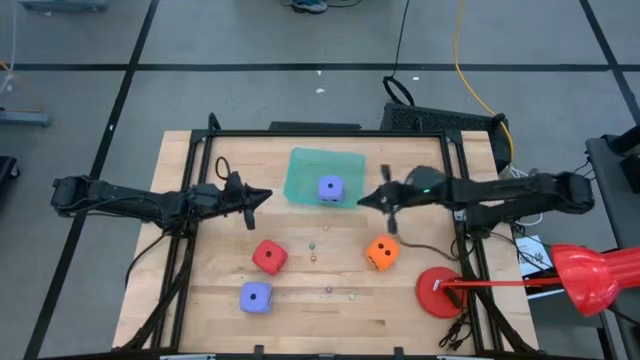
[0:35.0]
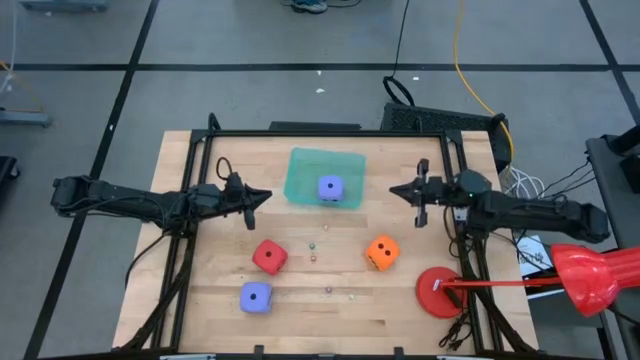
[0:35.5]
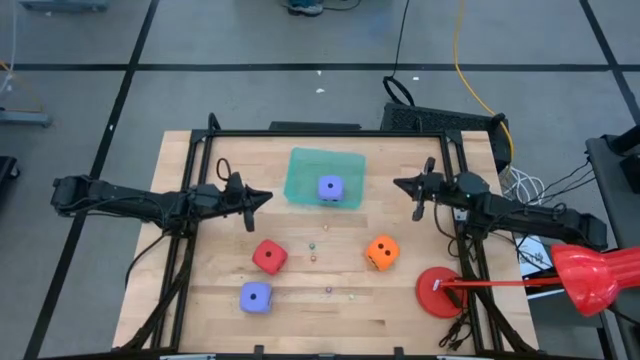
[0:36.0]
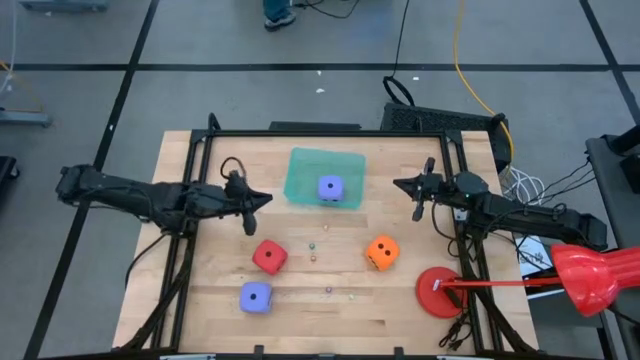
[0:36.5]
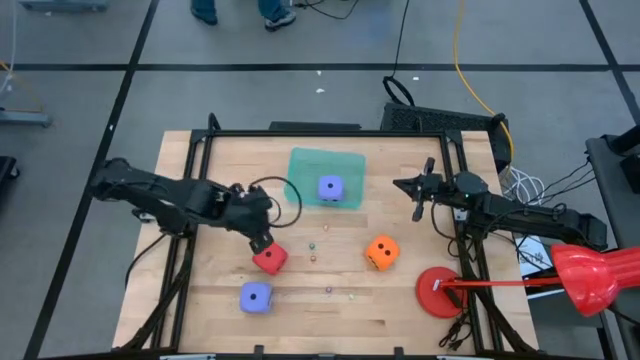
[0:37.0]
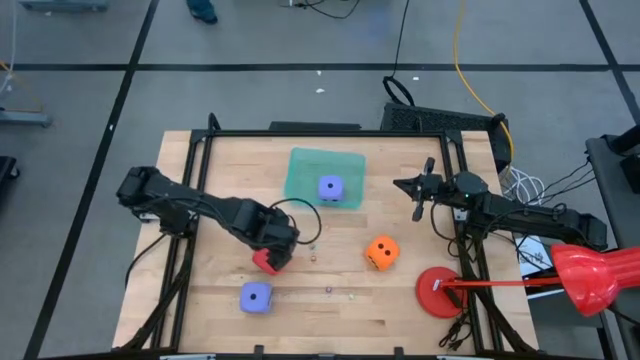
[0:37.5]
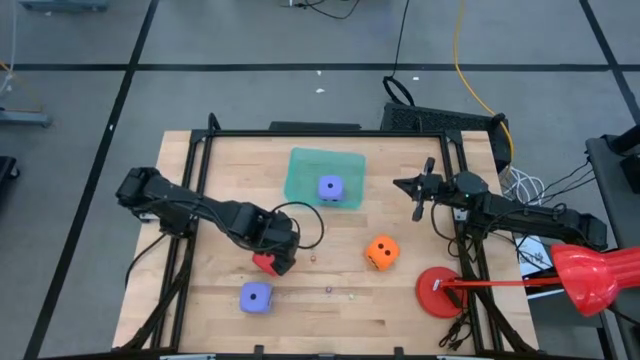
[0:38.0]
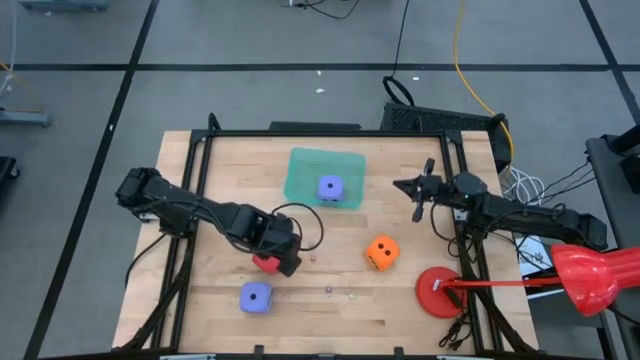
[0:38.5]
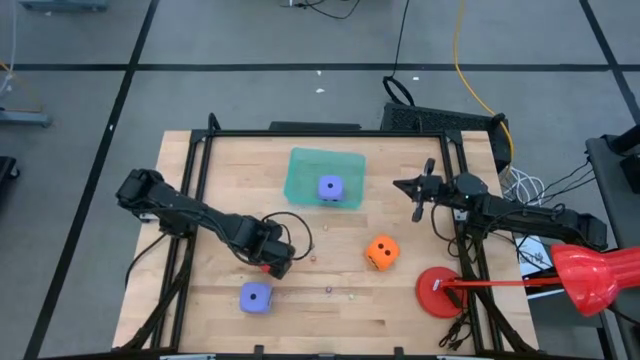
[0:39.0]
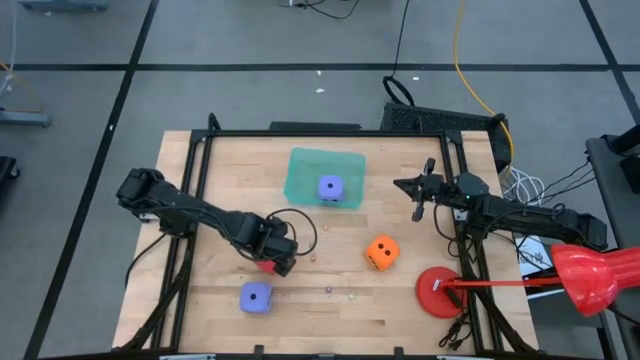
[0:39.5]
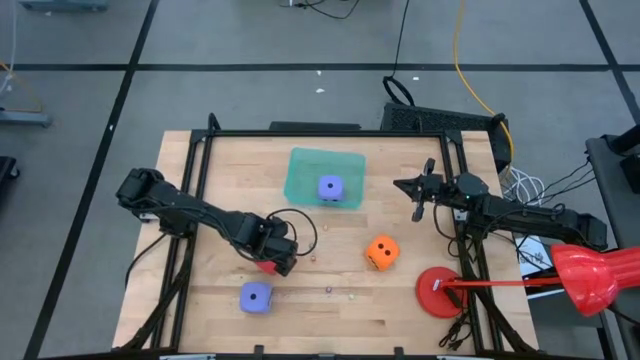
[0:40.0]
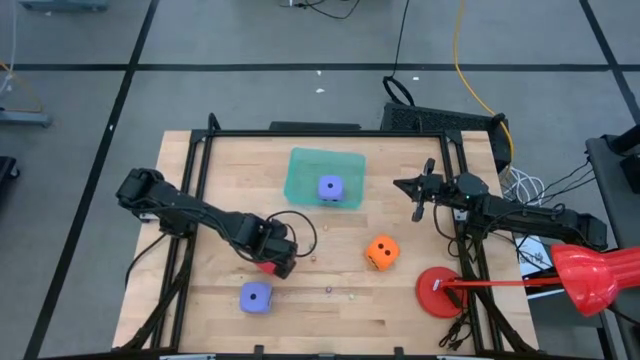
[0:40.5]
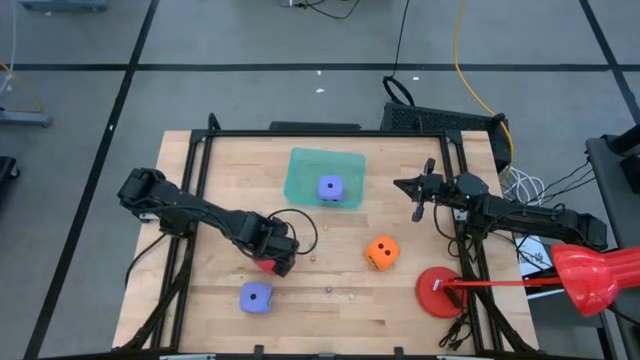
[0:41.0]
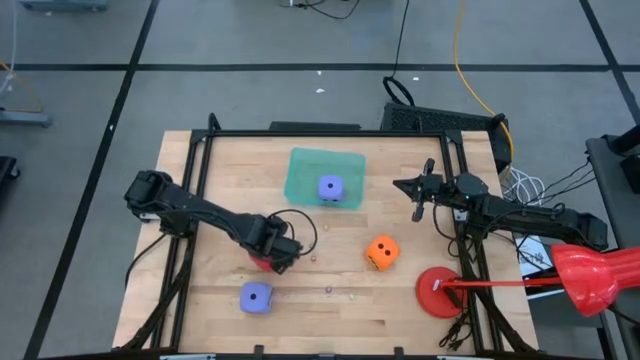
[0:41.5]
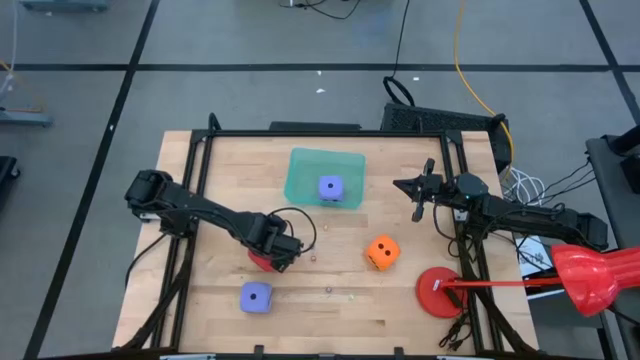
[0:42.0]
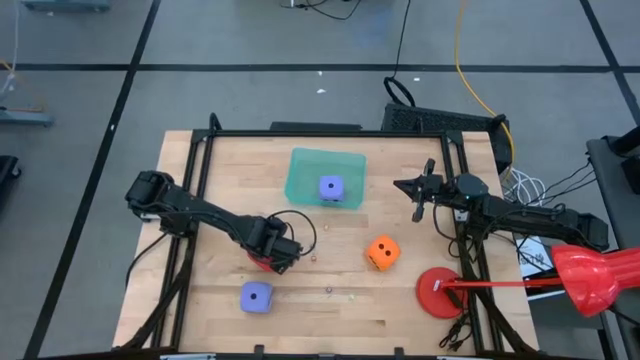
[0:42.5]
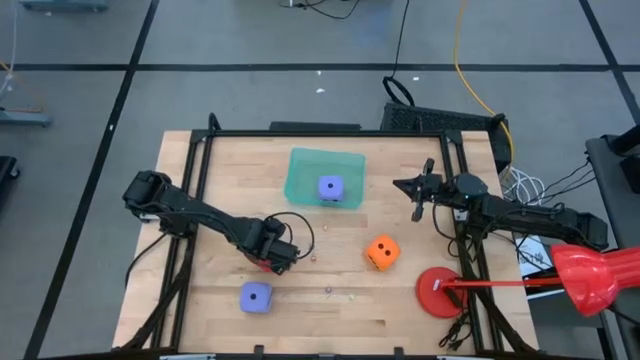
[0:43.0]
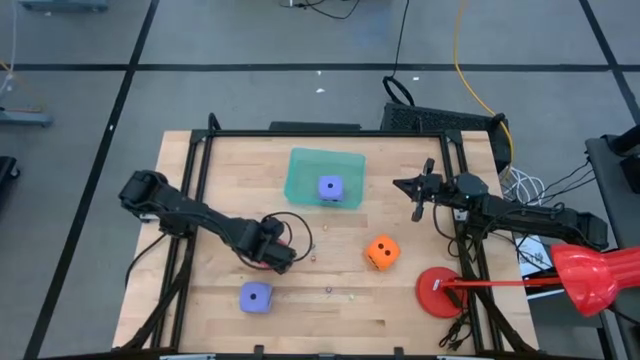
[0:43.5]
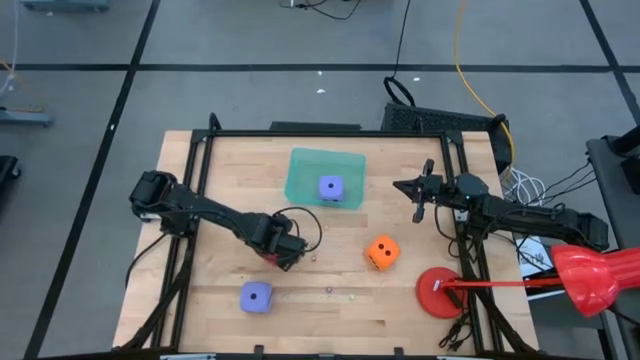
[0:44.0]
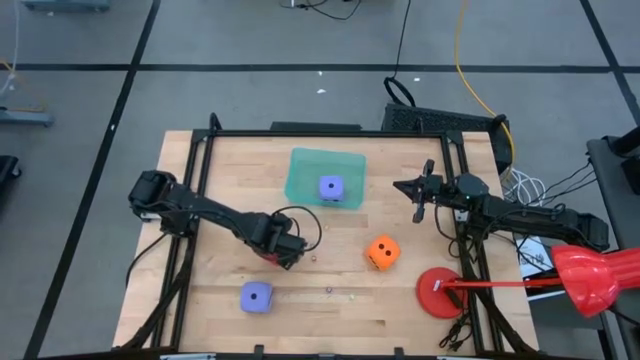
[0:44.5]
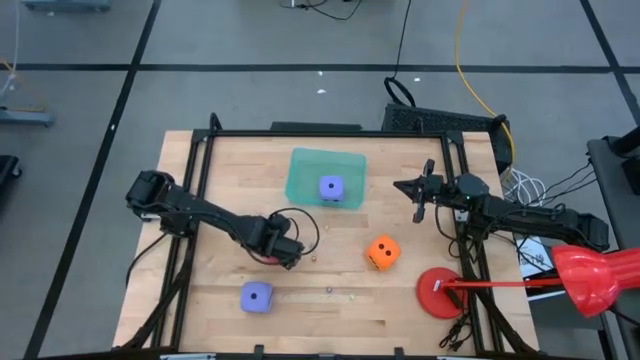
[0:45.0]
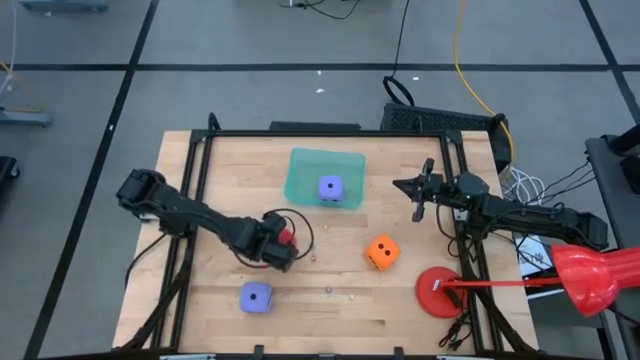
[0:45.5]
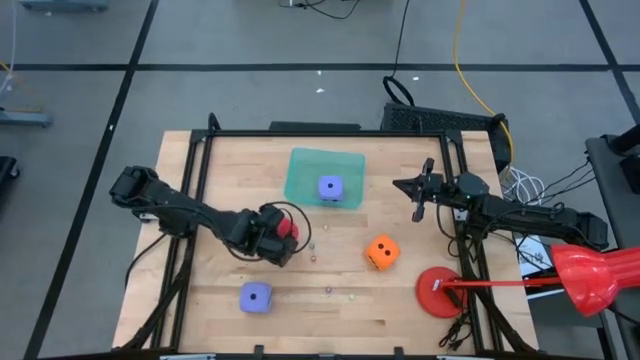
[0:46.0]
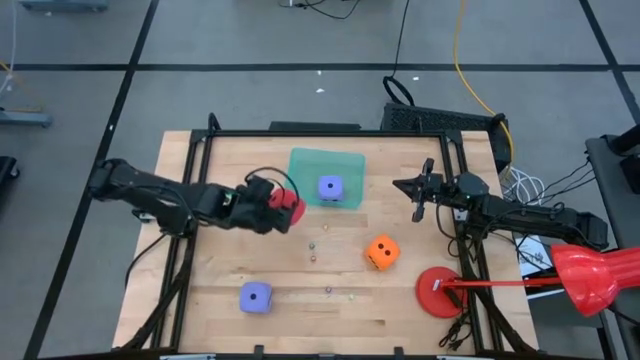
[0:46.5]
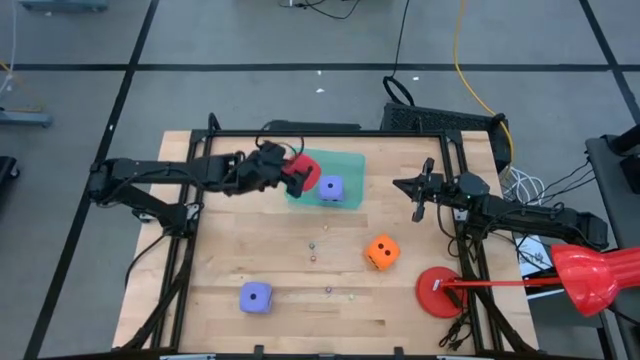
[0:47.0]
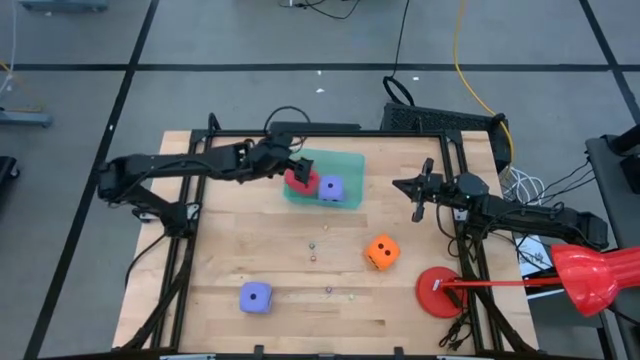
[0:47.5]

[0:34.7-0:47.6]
Task: Pick & Place Dice
Put the large red dice into the blue bin

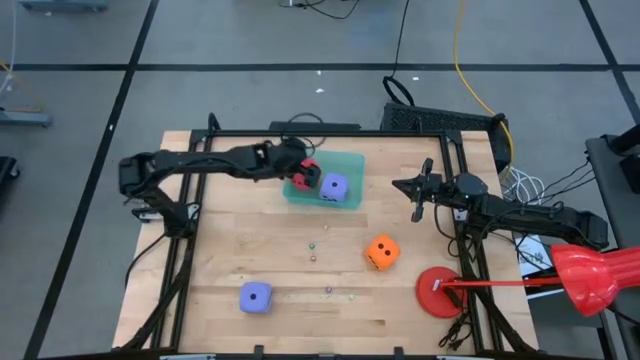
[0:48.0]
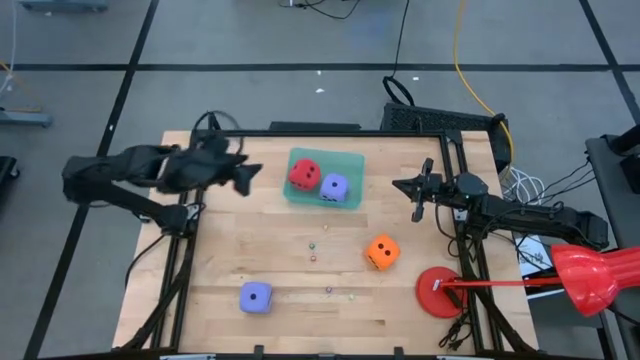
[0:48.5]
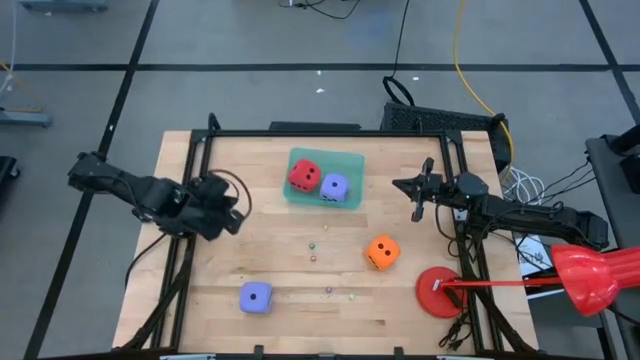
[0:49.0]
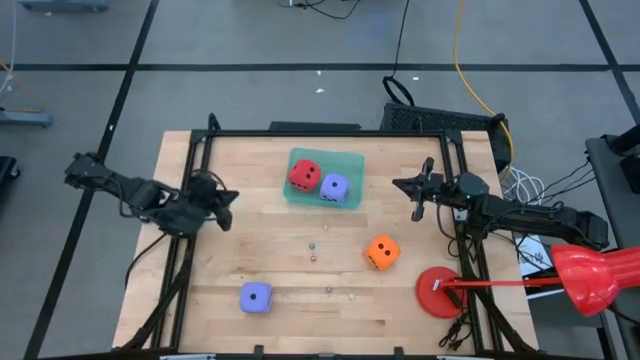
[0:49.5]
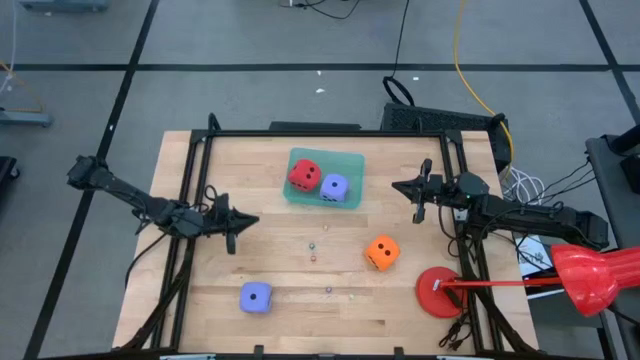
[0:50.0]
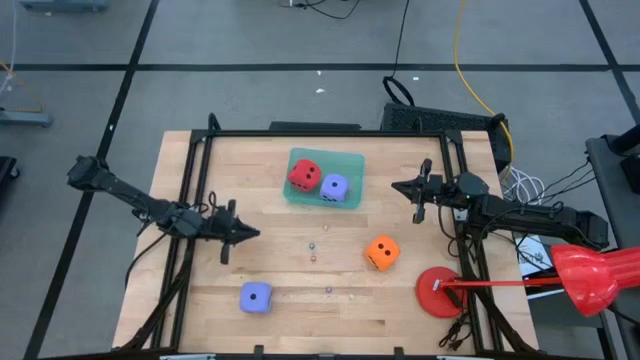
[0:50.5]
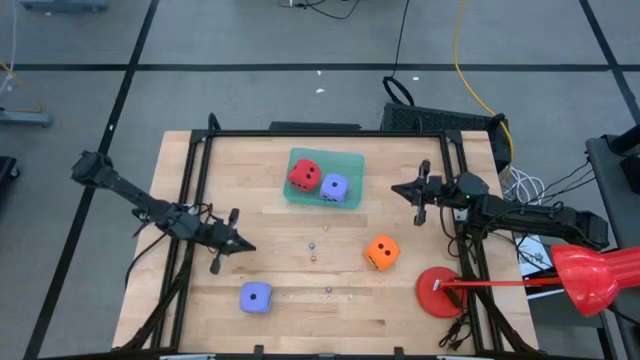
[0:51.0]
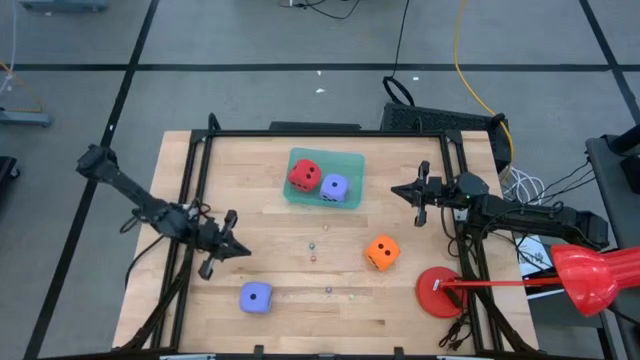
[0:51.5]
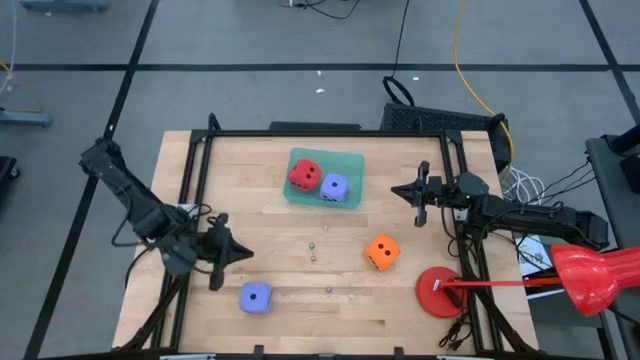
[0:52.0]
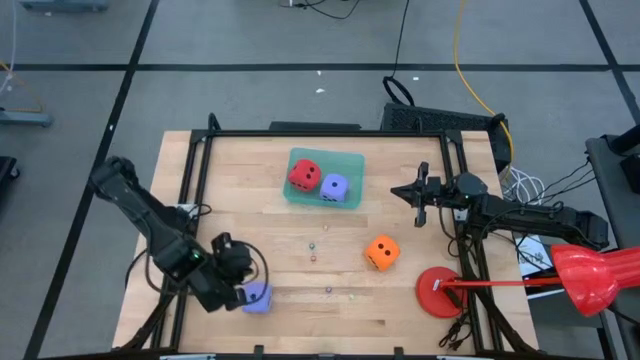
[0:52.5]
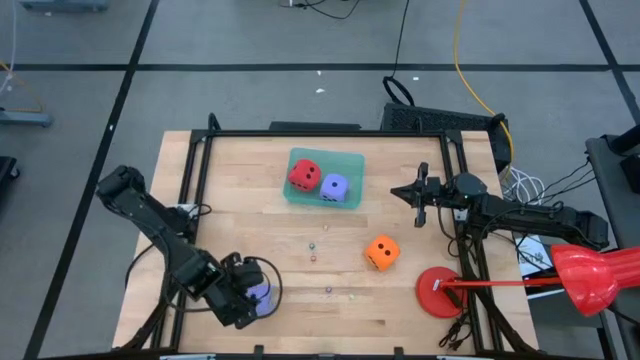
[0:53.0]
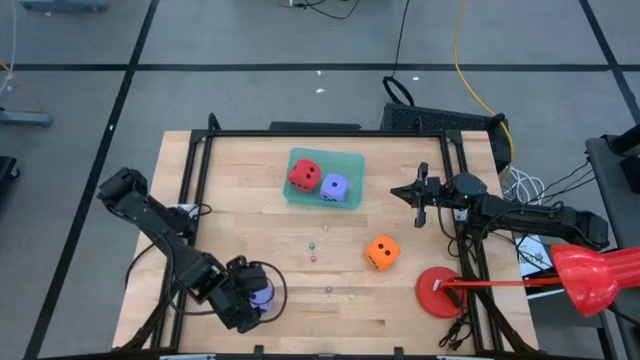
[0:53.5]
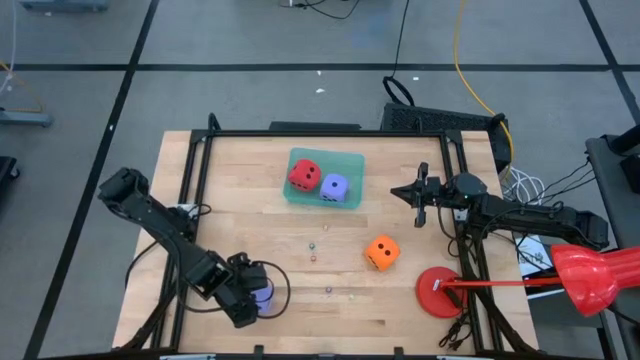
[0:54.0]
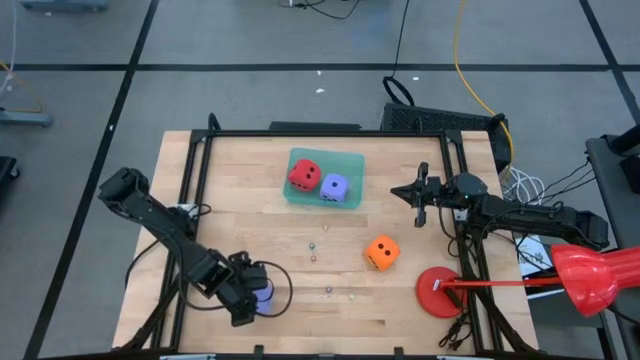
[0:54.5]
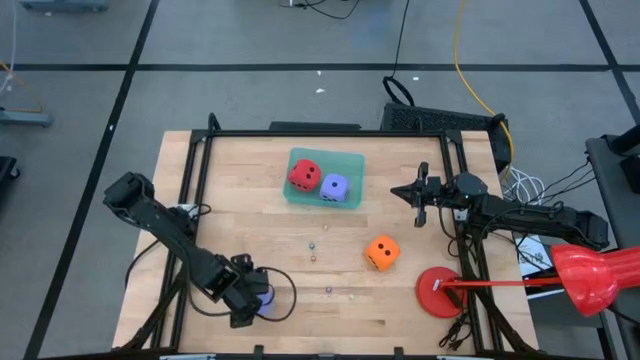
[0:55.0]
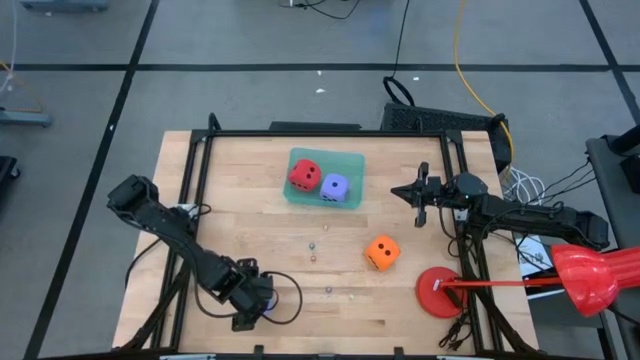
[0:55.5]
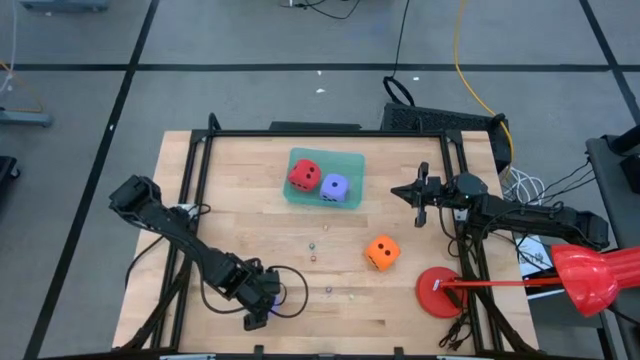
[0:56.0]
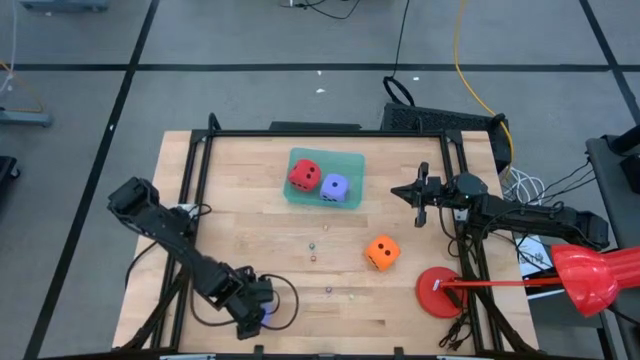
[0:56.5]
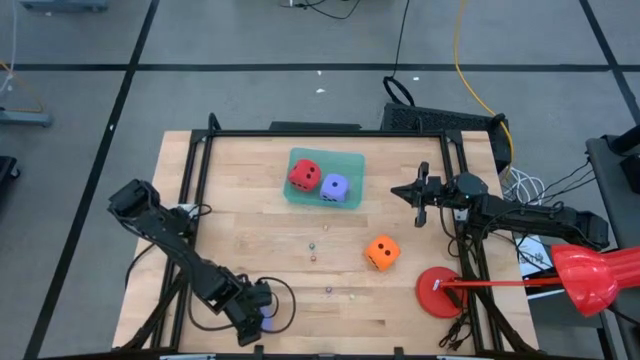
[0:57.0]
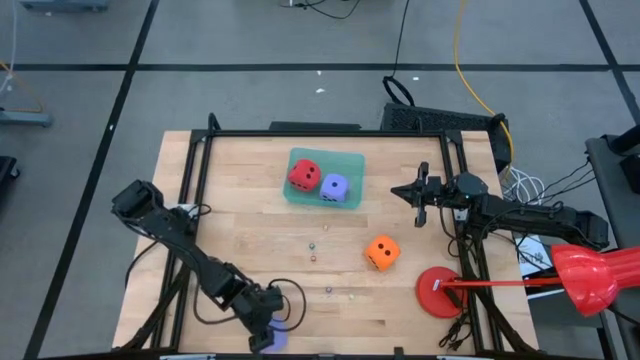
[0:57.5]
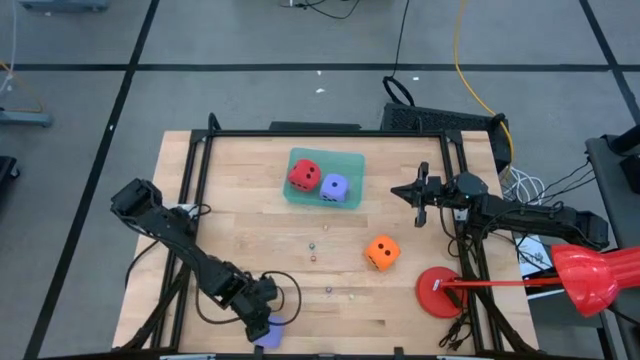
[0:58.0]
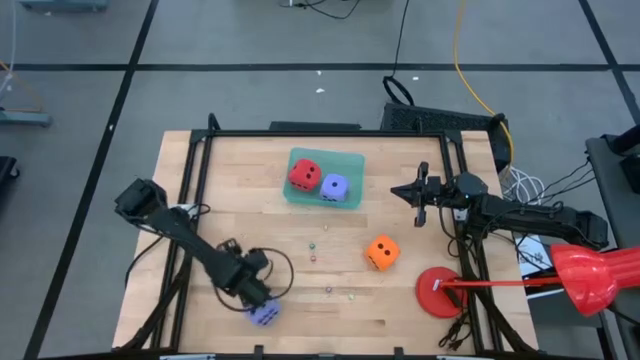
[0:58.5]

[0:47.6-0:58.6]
Put the large purple dice into the blue bin
